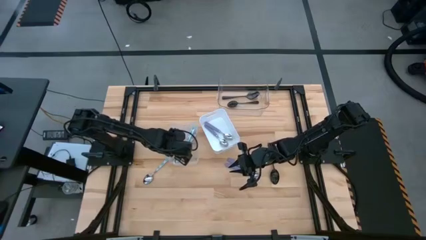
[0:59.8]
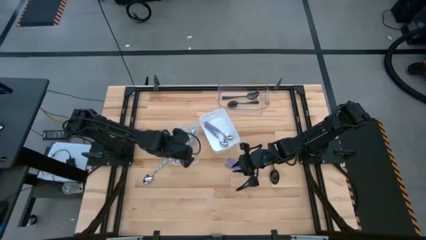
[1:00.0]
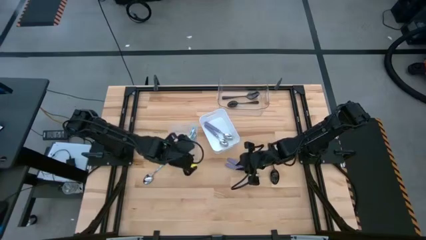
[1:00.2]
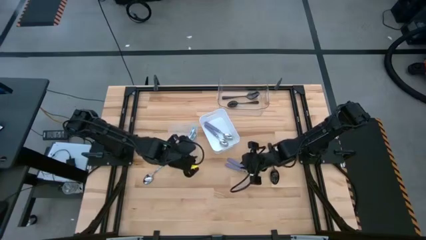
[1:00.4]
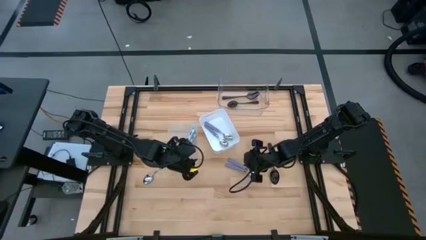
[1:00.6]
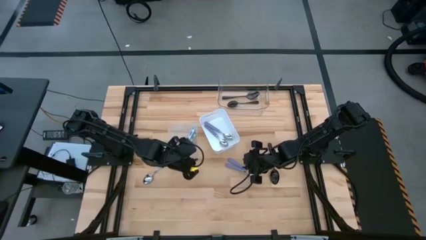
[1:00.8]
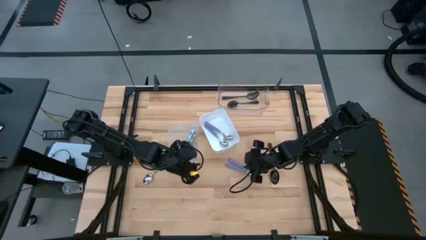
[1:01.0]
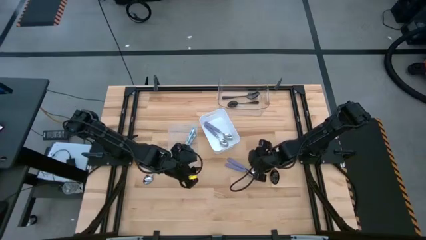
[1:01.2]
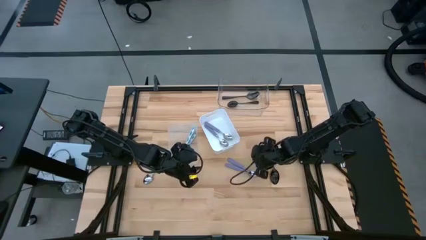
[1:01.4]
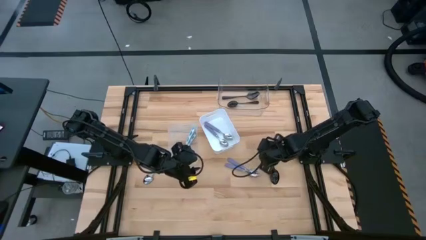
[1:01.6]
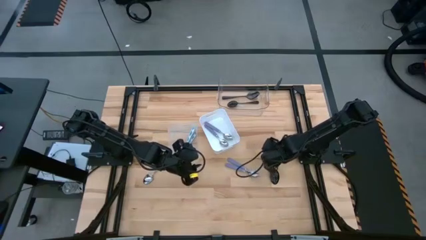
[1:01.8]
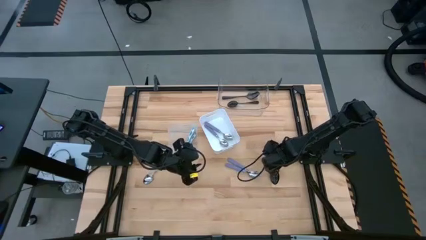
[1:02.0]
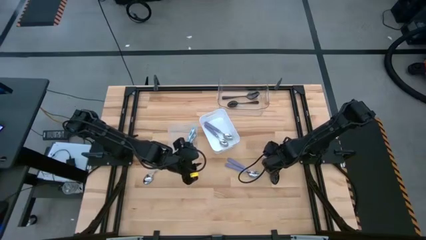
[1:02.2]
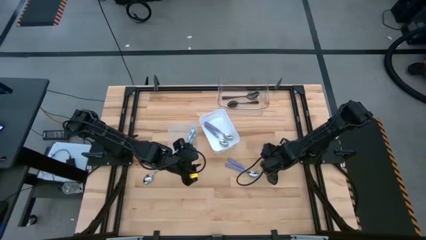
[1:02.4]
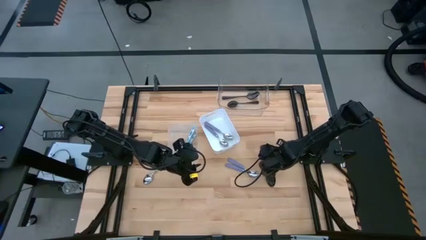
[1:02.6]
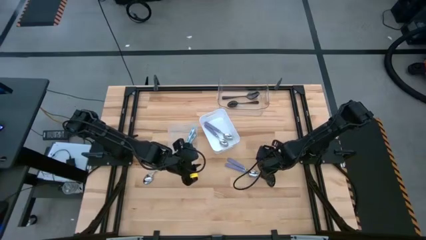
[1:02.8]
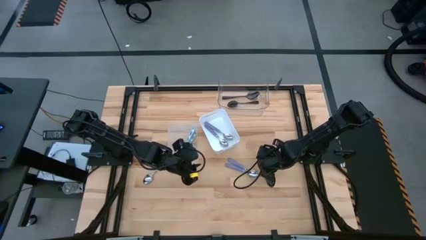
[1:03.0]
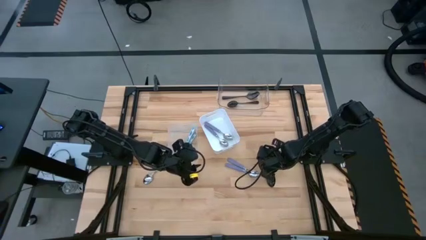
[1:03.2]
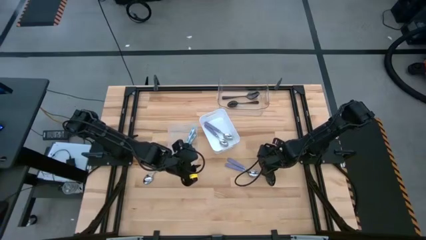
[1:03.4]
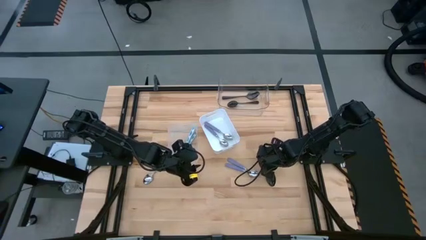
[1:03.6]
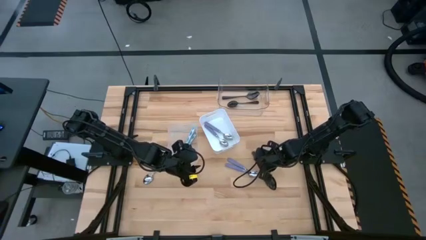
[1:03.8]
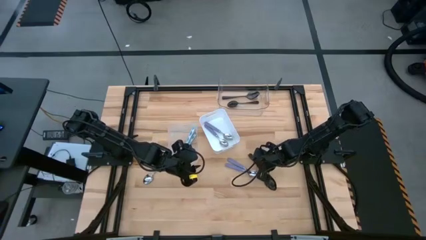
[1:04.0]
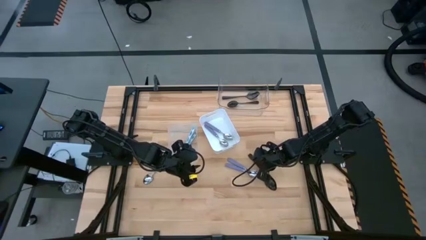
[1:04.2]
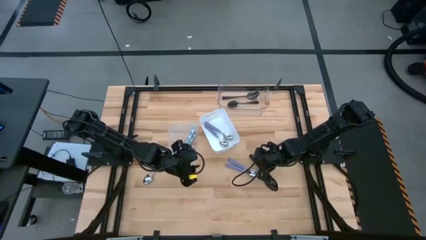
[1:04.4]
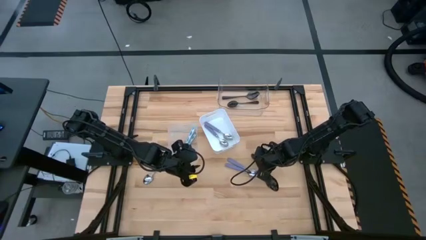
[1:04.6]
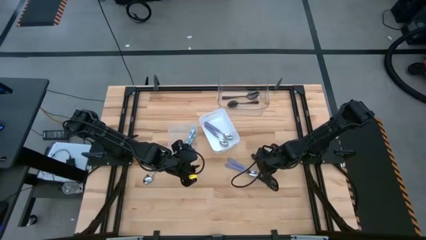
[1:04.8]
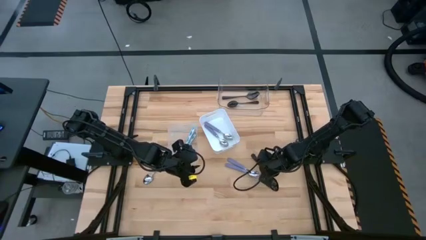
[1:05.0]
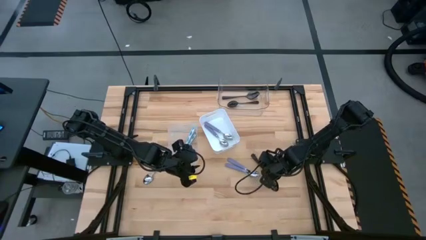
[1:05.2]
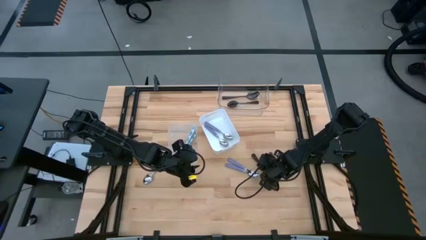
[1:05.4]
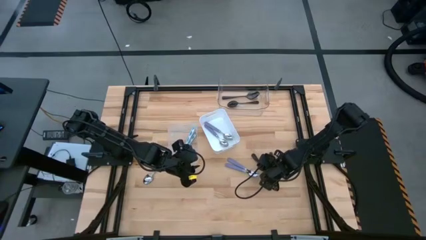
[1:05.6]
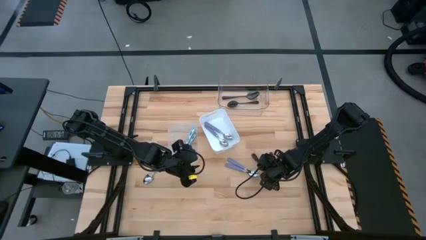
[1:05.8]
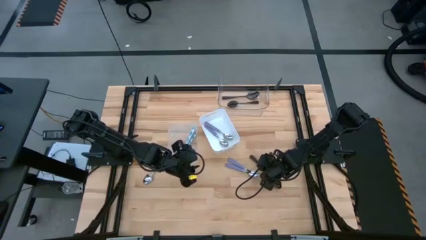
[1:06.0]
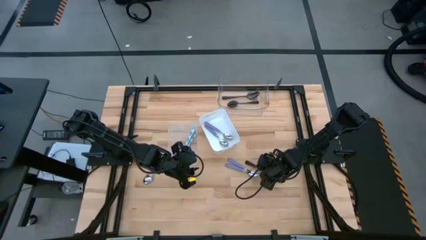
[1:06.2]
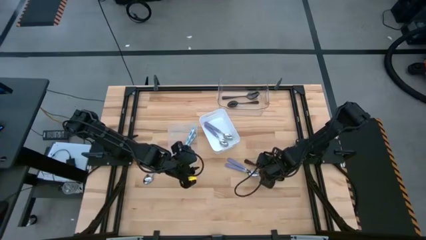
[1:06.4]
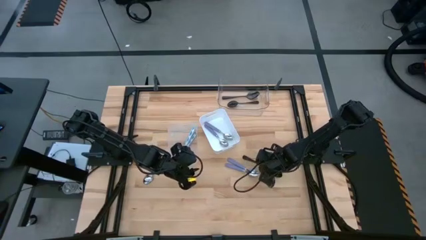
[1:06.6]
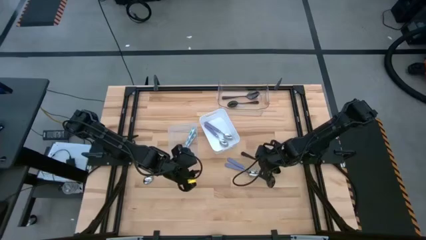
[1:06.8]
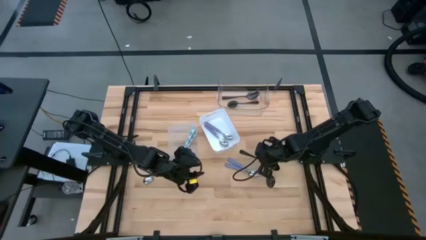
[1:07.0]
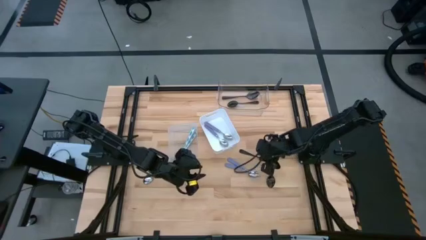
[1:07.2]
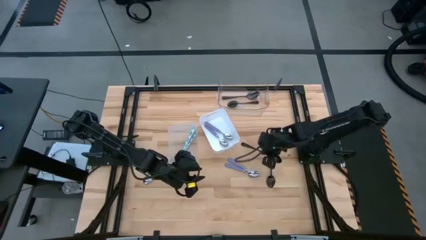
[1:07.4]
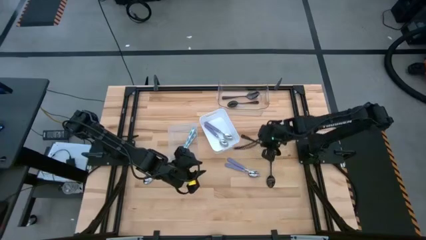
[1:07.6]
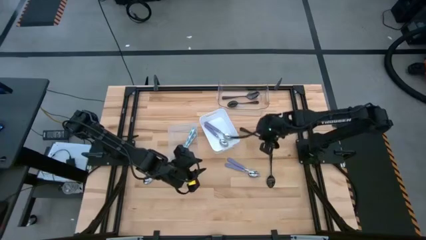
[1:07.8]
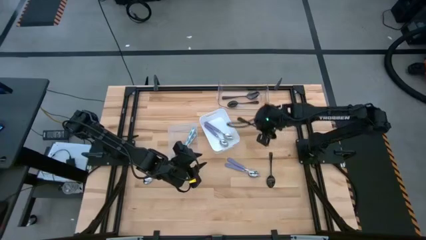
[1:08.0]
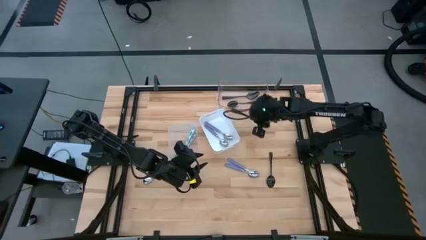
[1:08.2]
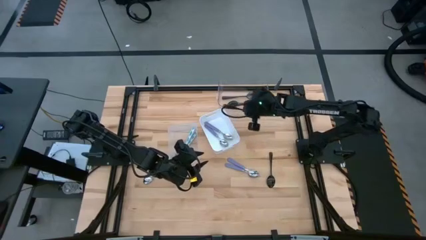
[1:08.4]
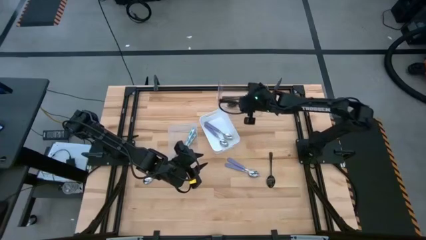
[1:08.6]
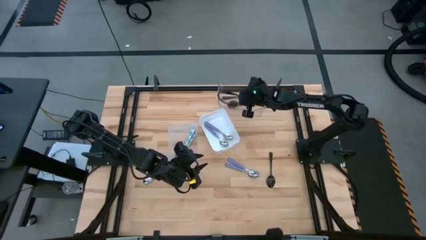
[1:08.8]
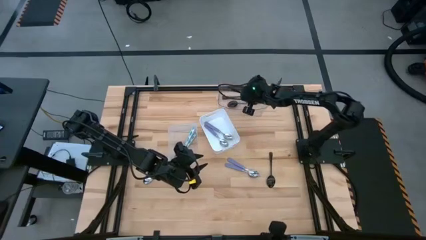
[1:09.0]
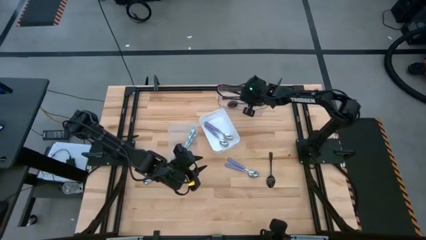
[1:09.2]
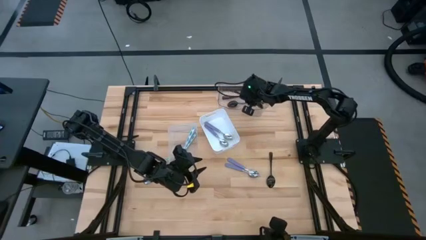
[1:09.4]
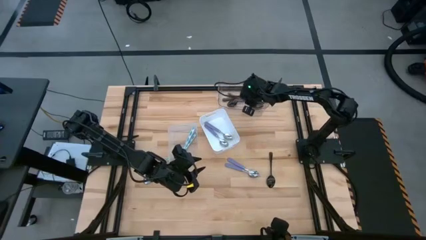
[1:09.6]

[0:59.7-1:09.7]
Task: Sort silverware by color (type)
Put the black spoon into the top transparent bin
